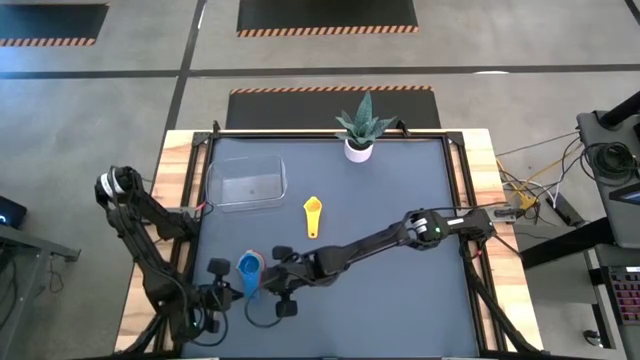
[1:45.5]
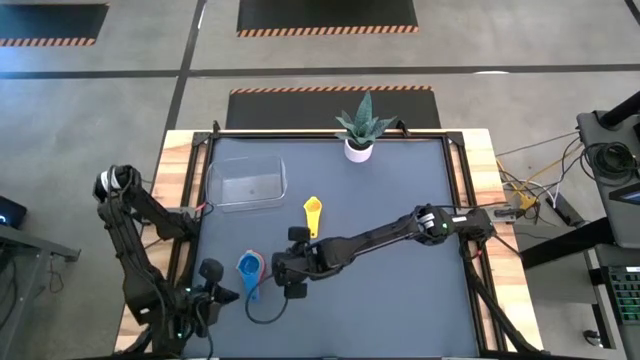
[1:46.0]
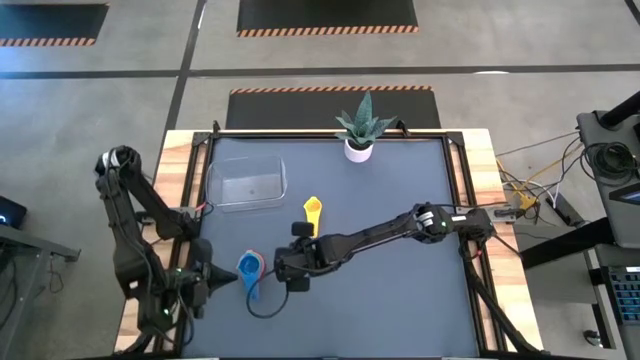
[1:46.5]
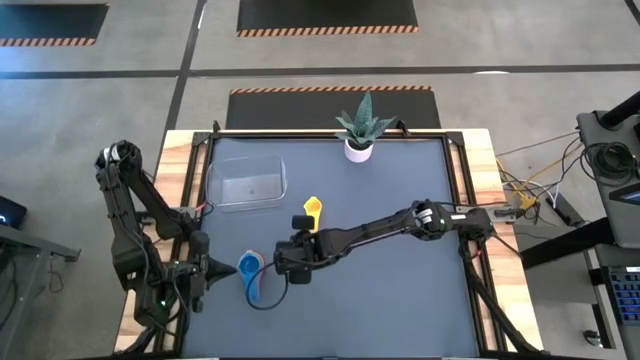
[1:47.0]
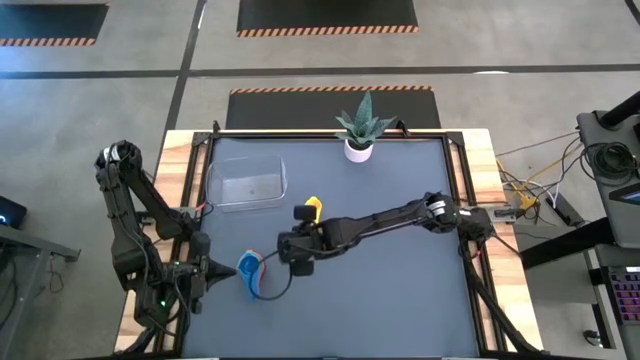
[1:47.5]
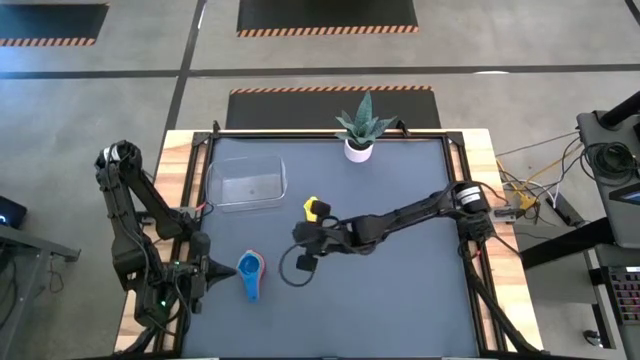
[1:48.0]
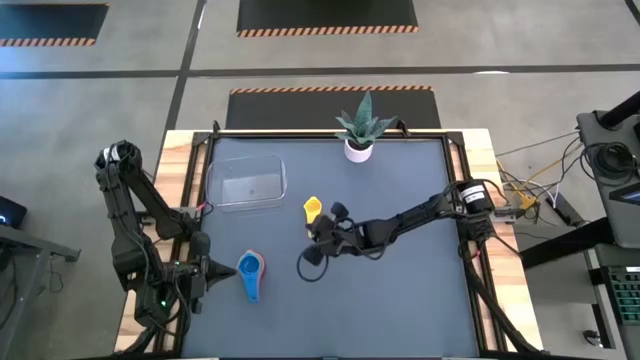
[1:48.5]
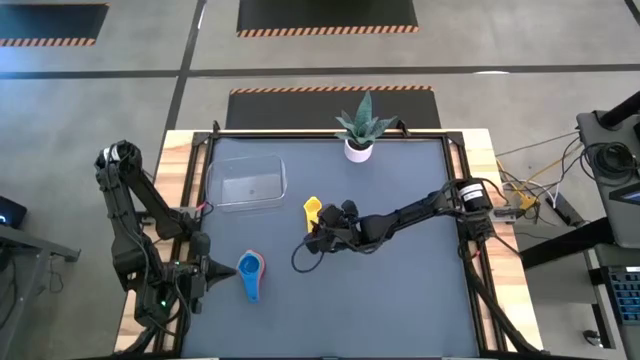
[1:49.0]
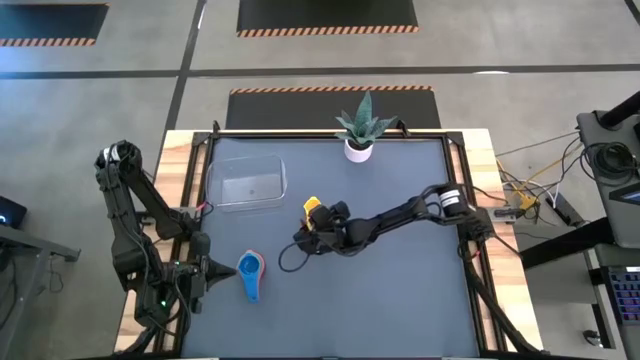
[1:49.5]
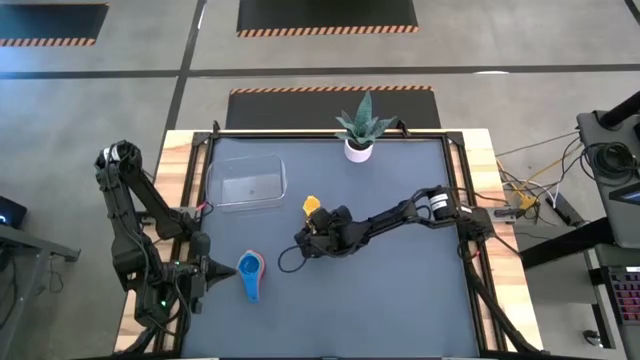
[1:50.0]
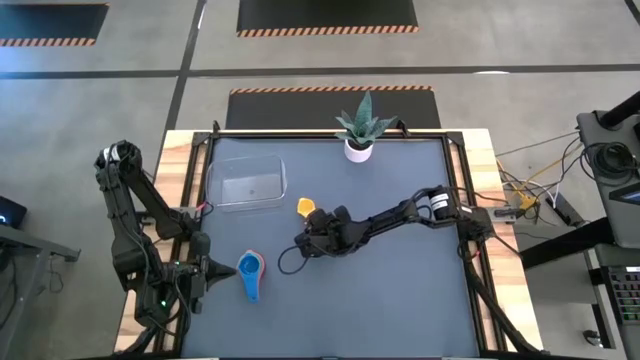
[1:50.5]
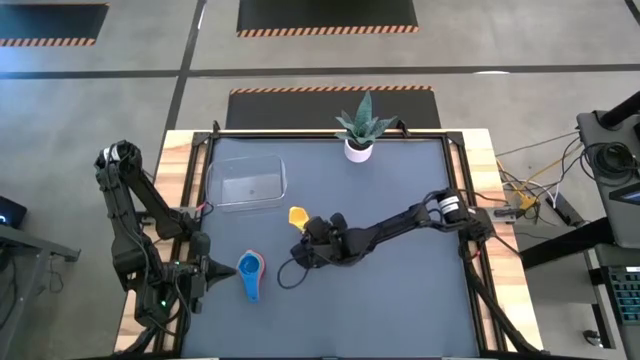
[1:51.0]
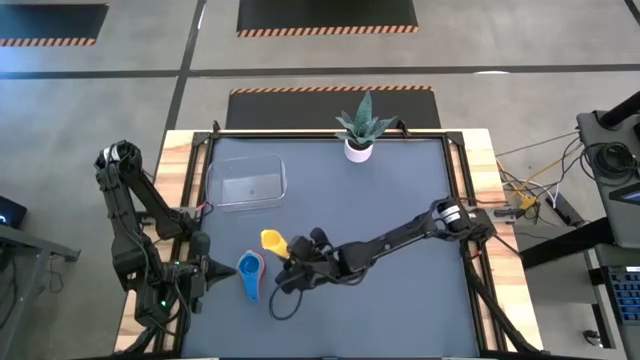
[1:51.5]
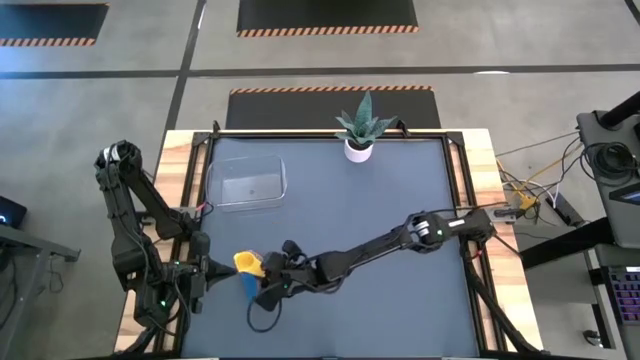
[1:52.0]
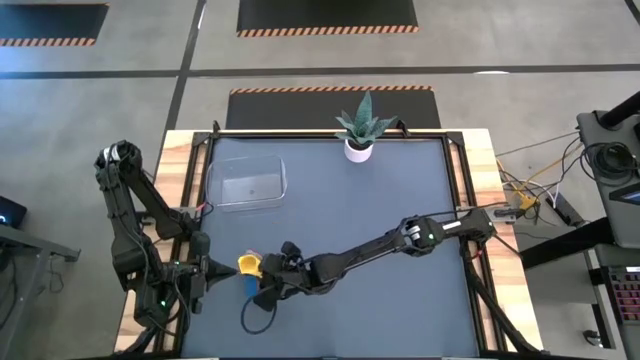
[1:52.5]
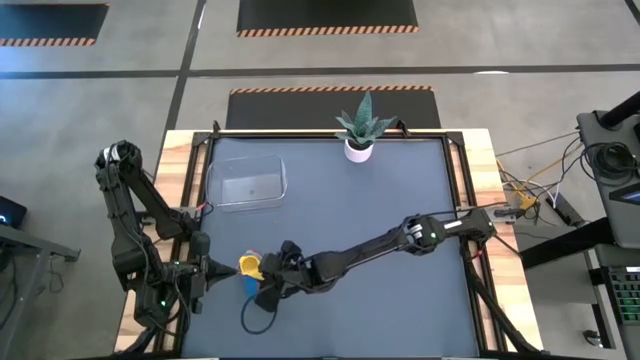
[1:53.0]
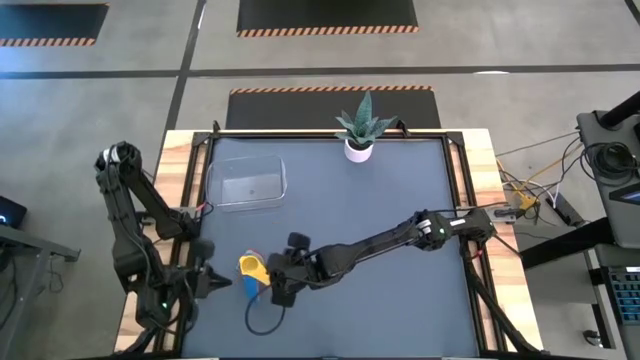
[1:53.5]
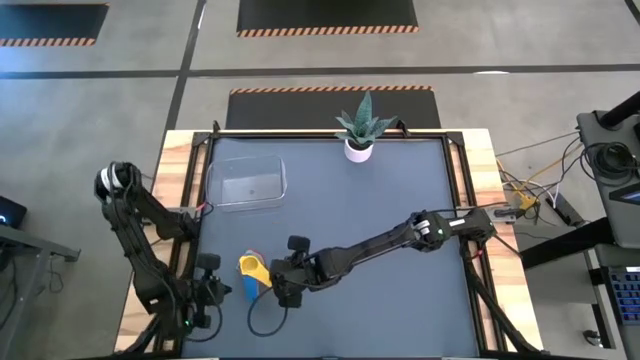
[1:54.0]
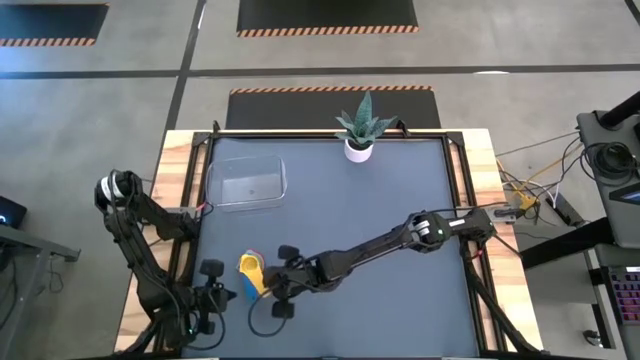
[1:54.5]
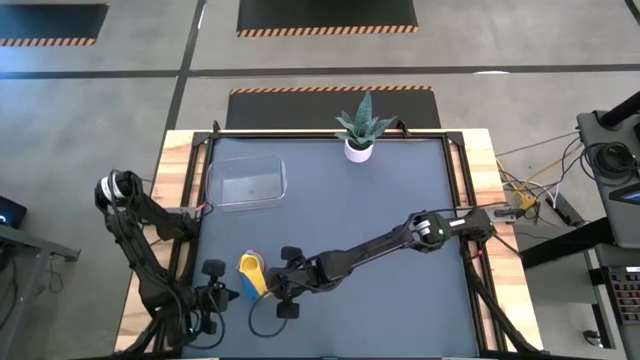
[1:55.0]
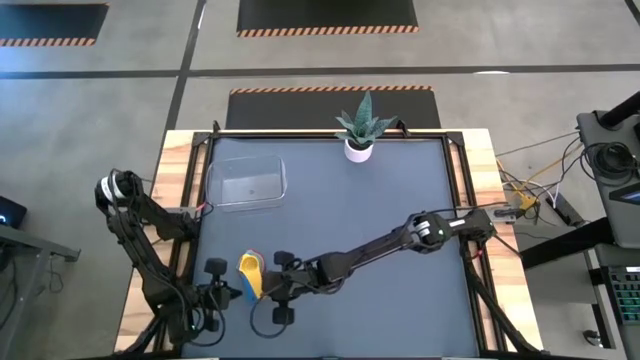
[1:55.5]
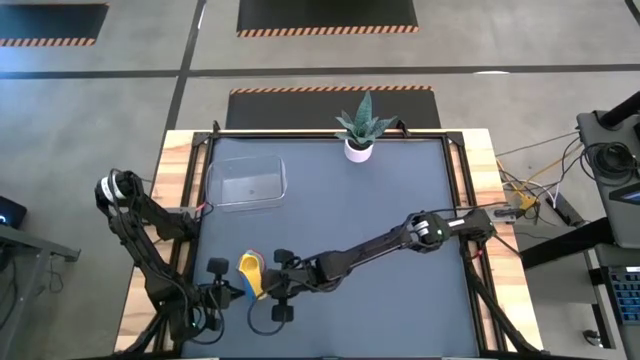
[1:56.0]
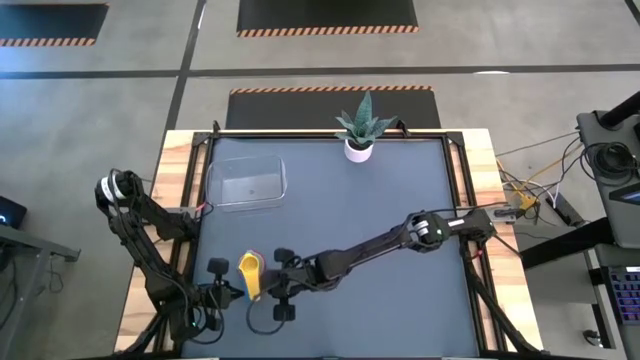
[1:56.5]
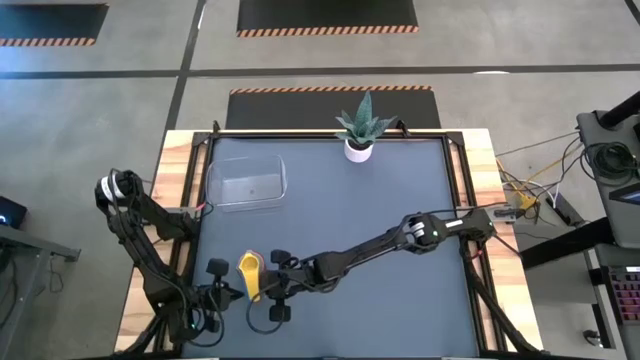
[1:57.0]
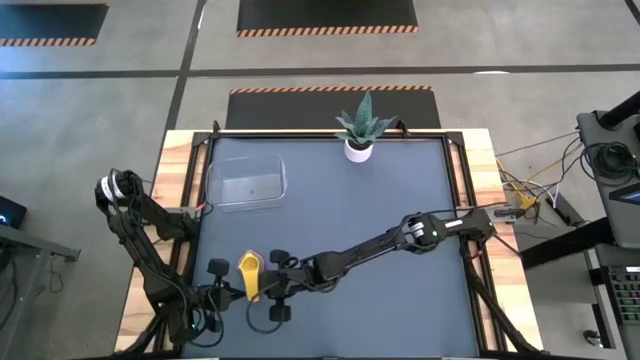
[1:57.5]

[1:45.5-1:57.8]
Task: Nest measuring cups in basket
Stack the yellow measuring cup on top of the blue measuring cup

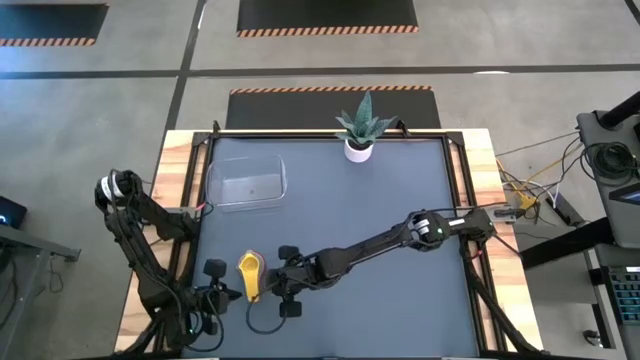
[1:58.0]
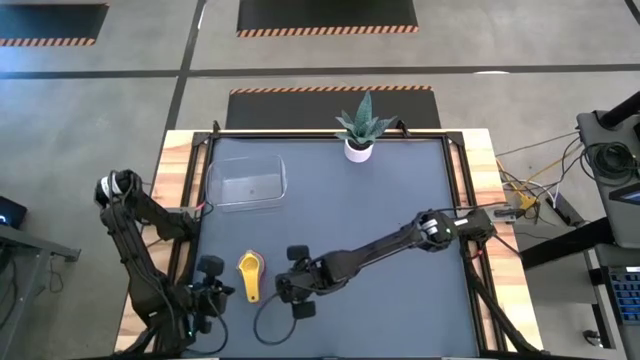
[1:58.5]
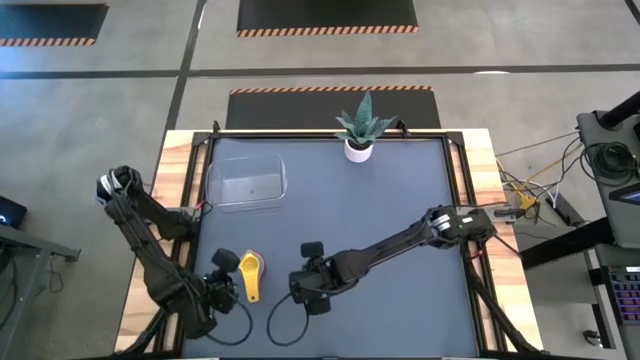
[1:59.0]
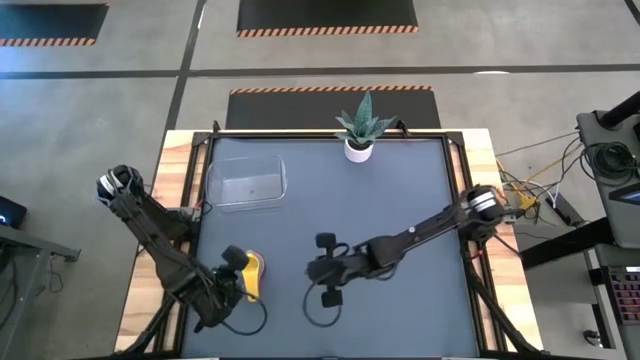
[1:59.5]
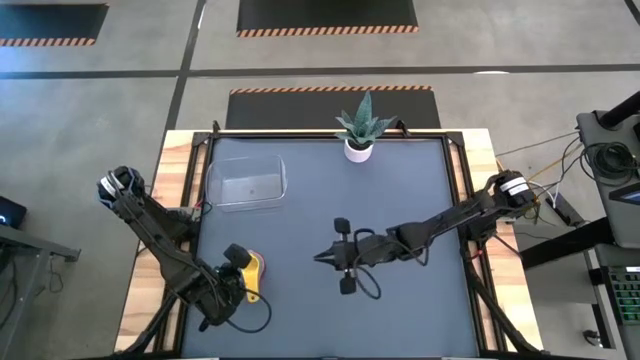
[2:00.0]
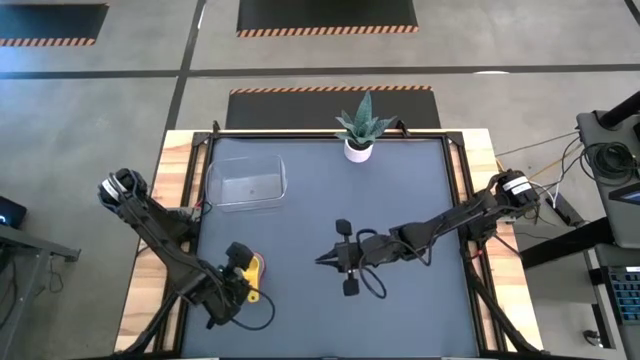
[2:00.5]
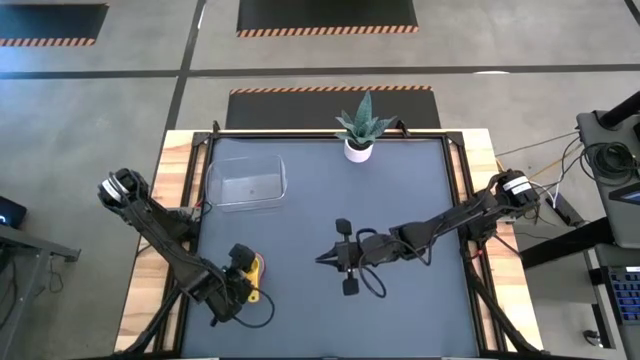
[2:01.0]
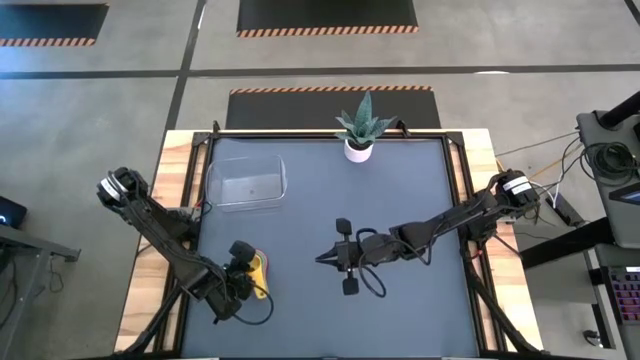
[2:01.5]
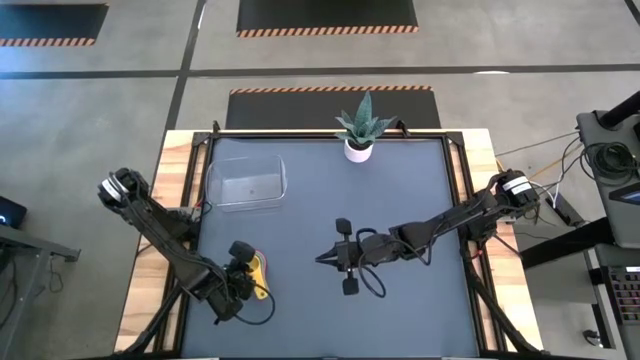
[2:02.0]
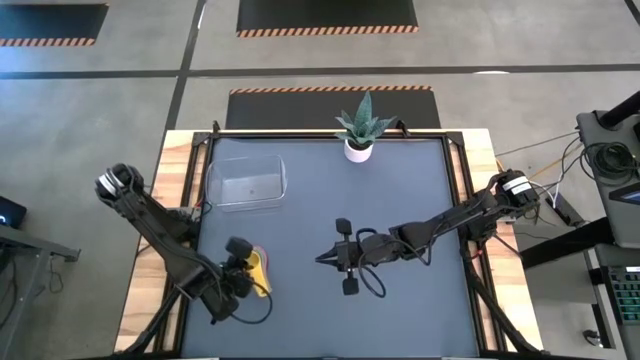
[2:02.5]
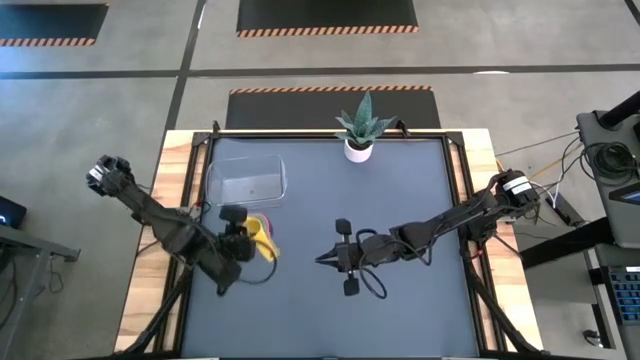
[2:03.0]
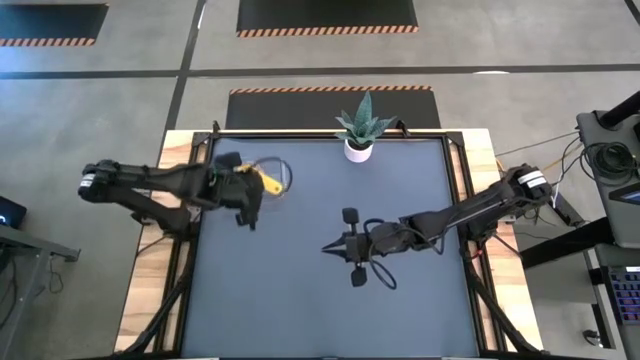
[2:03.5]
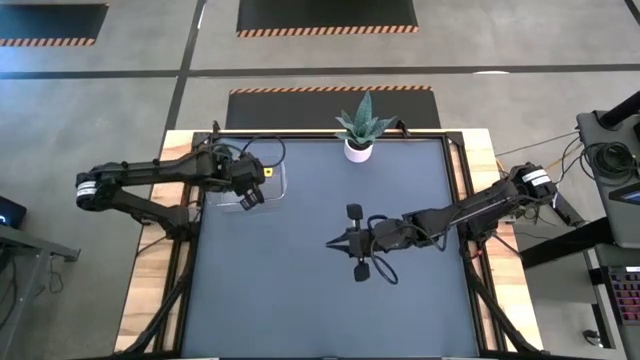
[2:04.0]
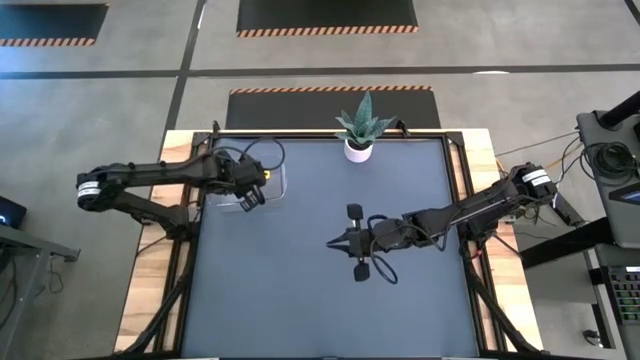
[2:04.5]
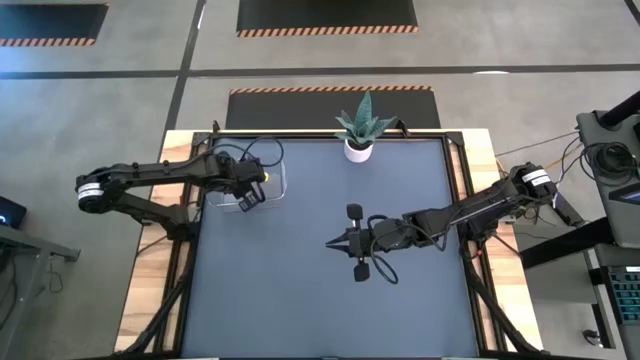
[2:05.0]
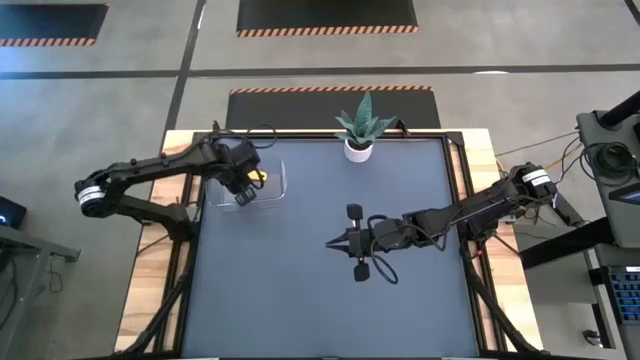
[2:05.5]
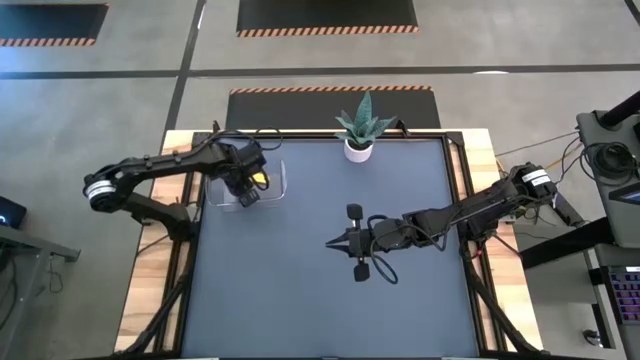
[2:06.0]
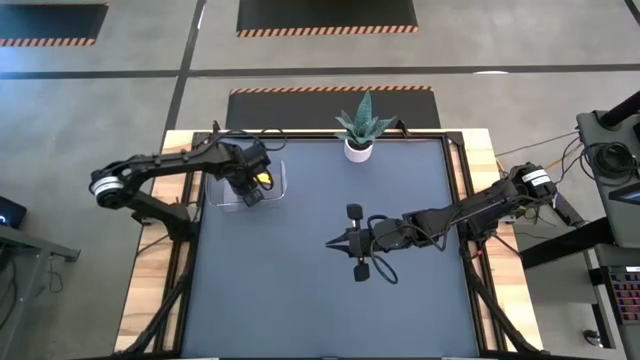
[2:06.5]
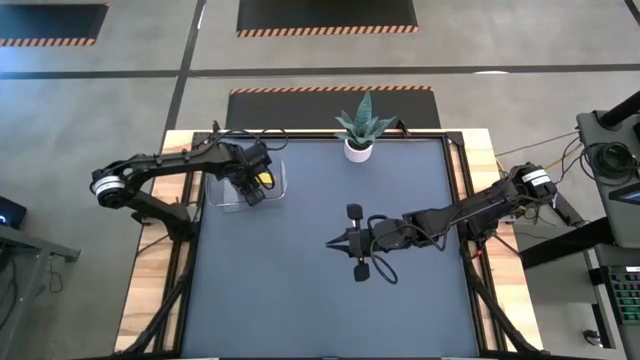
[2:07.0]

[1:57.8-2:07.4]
Put the stacked measuring cups into the transparent bin
